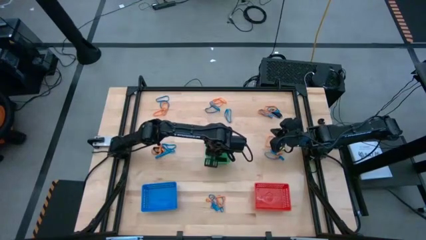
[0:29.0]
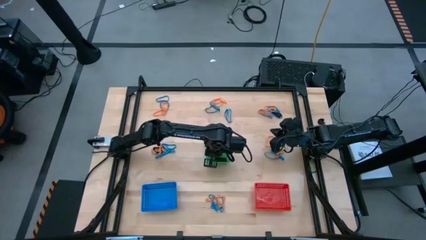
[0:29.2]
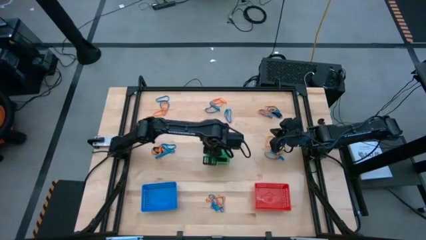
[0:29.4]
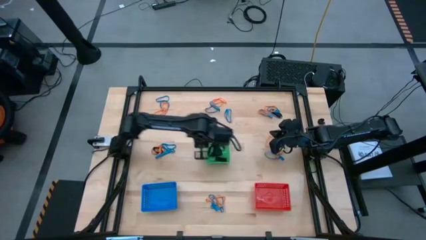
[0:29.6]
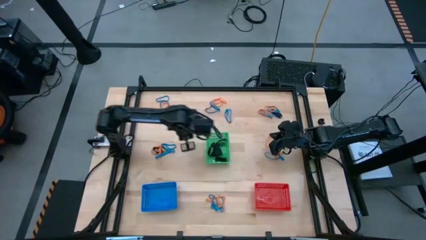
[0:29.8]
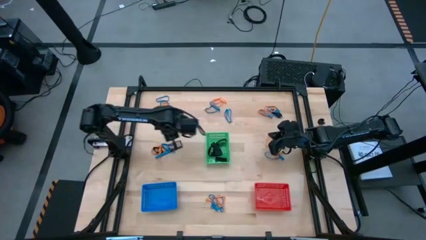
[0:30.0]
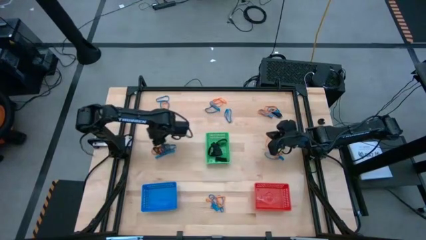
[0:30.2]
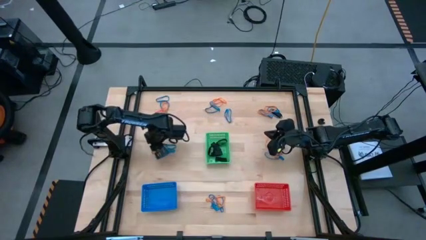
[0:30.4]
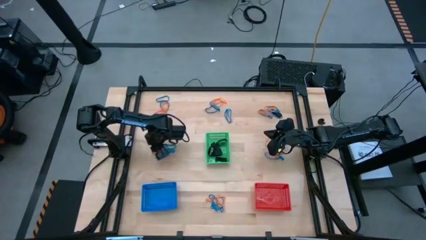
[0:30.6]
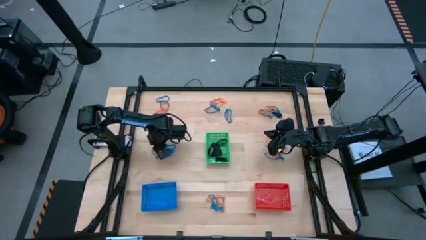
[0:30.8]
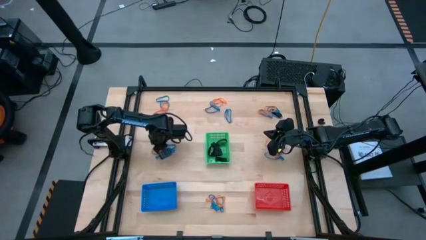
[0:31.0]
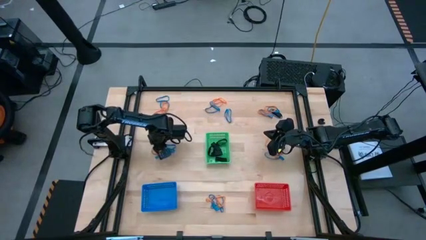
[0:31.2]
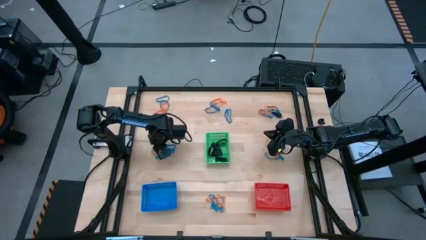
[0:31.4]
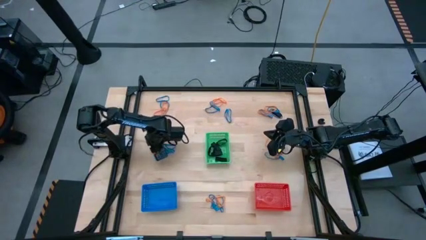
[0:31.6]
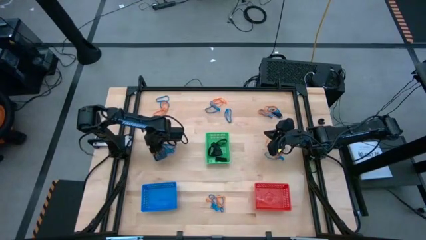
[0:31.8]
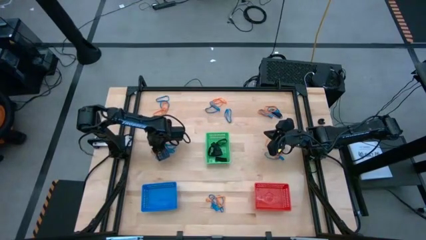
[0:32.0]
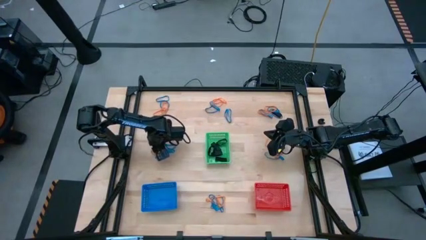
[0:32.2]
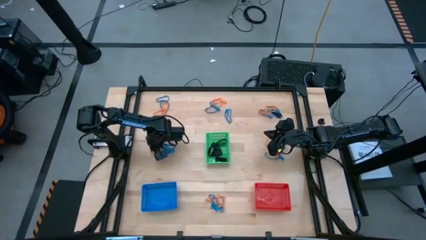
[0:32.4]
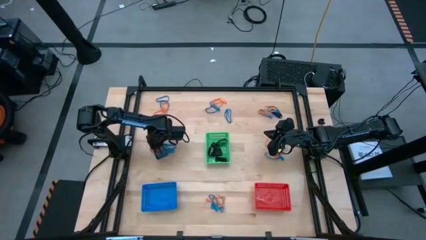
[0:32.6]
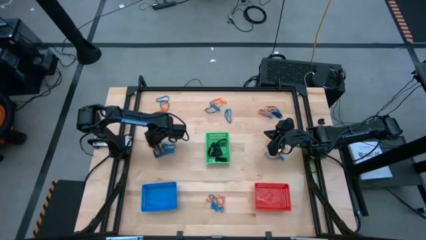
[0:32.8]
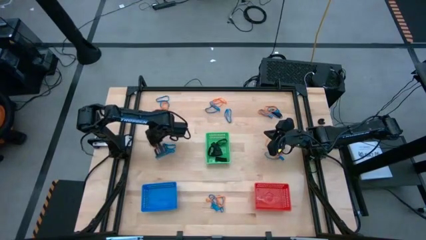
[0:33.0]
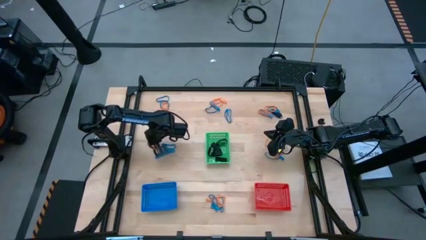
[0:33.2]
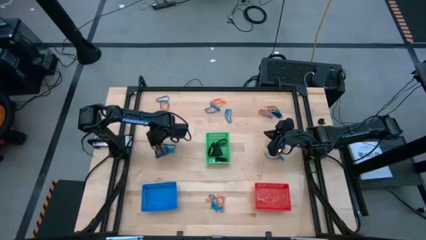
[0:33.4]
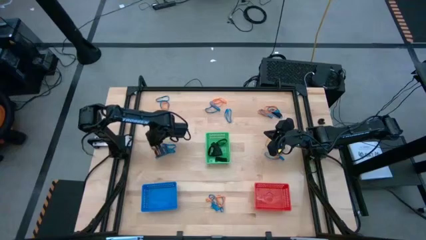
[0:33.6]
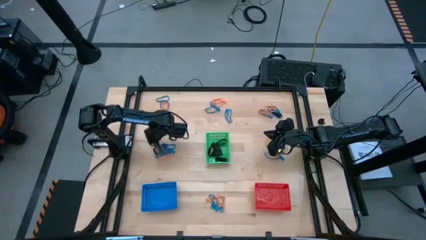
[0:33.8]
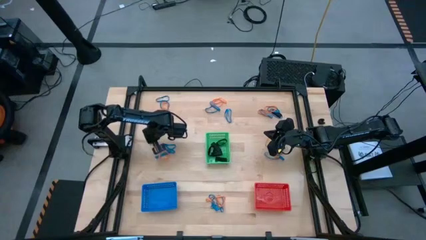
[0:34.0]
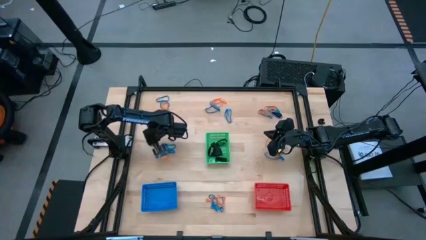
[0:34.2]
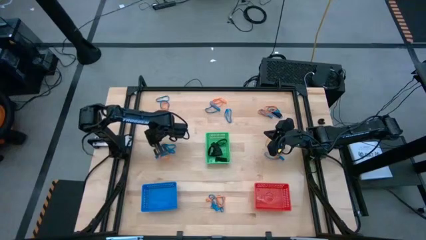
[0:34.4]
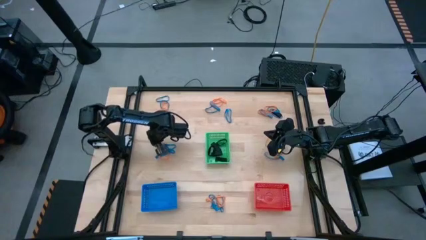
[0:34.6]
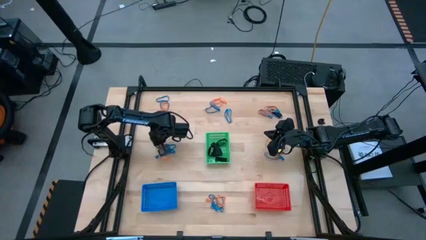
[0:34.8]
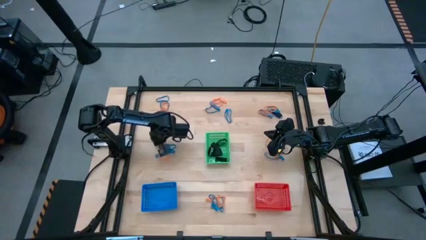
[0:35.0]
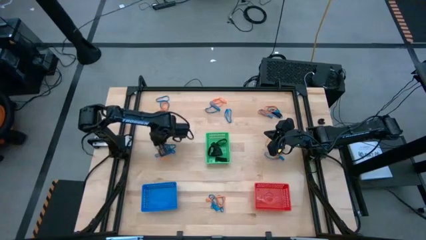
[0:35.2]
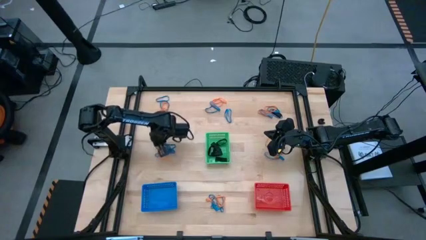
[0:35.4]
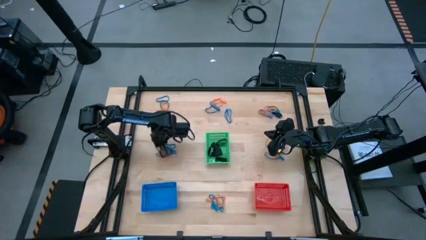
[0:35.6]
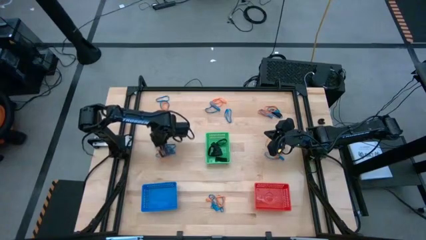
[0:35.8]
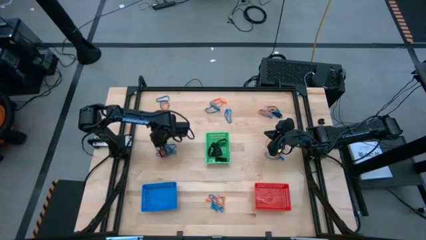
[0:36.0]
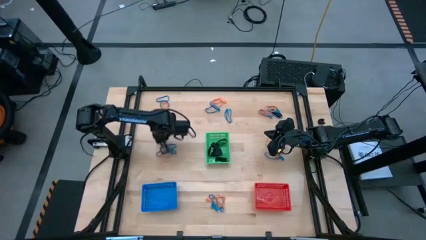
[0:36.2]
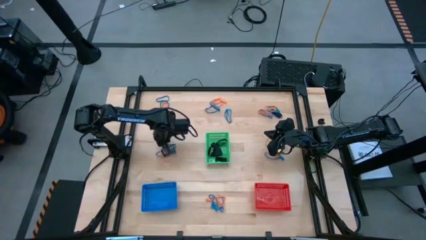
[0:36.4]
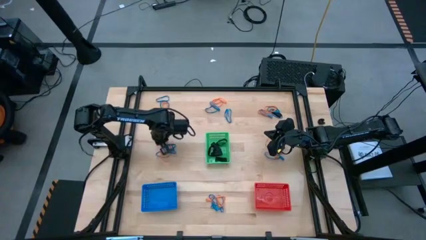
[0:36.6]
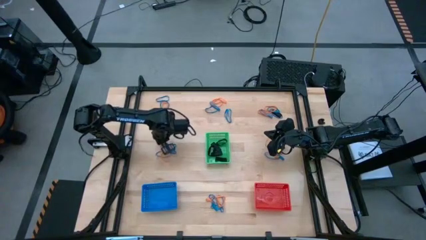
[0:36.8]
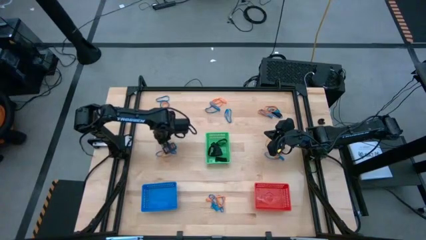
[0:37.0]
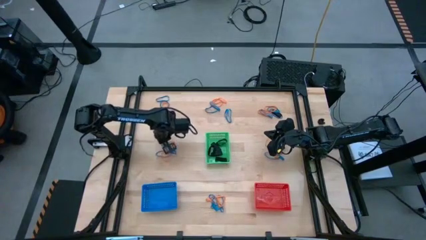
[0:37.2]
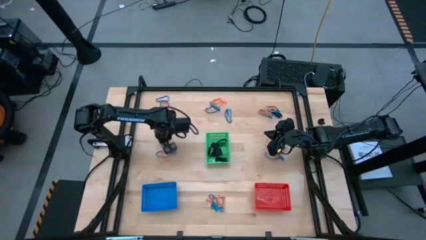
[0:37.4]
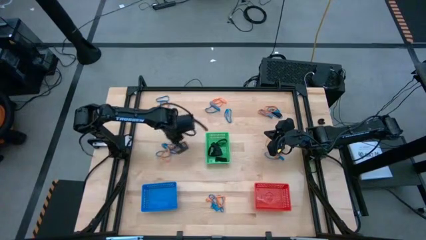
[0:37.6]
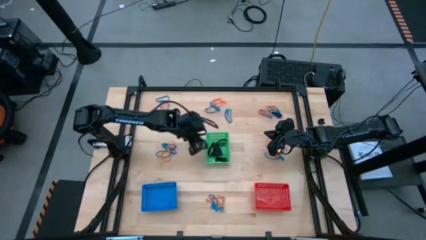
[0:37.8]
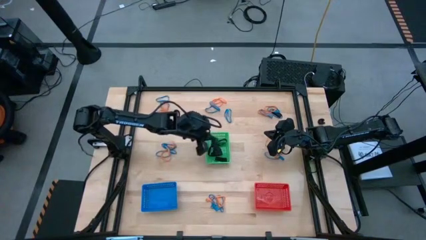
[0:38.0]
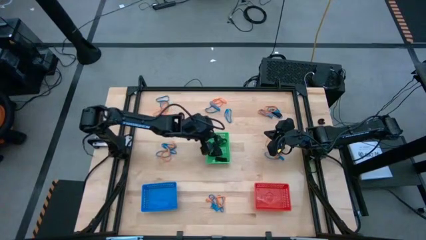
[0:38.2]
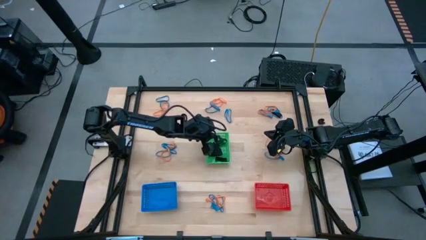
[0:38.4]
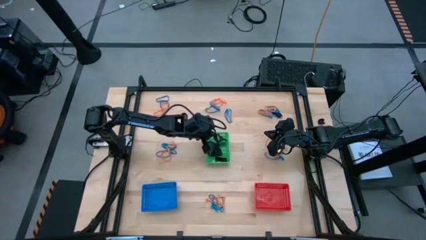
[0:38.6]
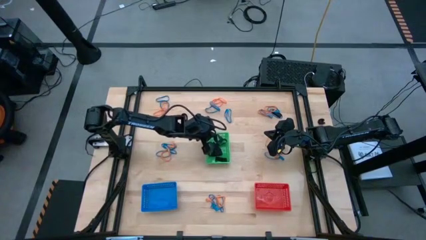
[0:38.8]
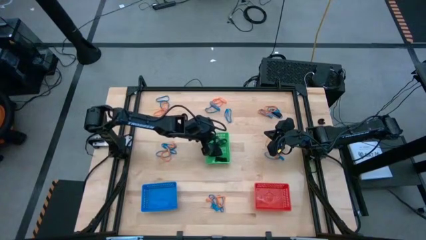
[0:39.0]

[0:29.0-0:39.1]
Task: Sort rubber bands into baskets
Put the black rubber band into the green bin

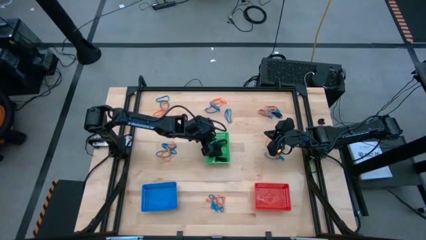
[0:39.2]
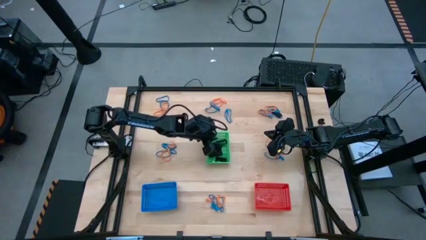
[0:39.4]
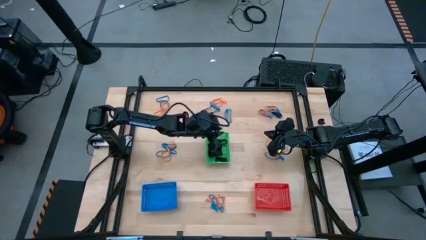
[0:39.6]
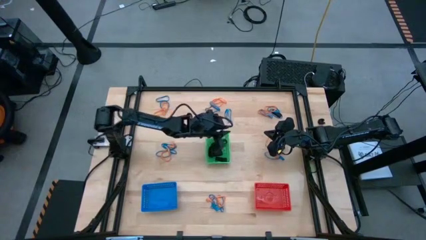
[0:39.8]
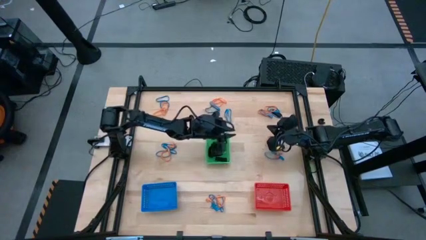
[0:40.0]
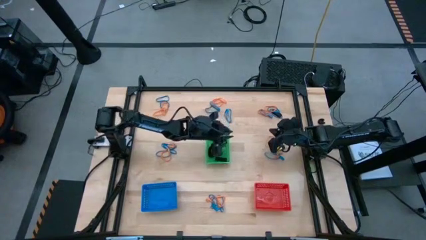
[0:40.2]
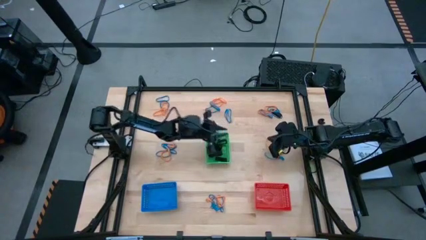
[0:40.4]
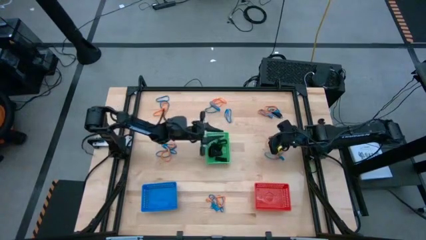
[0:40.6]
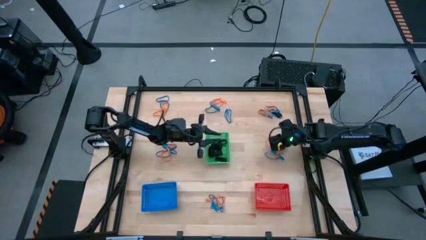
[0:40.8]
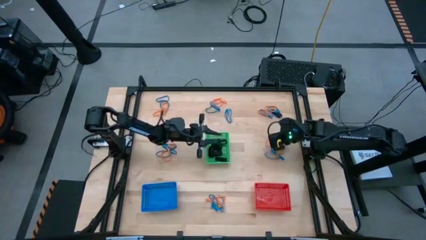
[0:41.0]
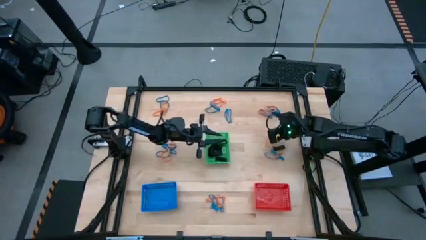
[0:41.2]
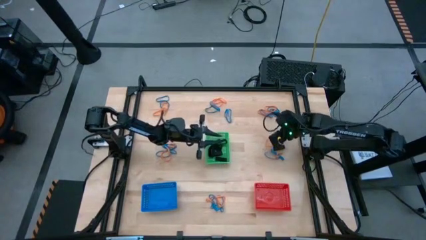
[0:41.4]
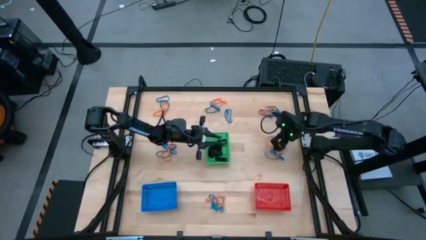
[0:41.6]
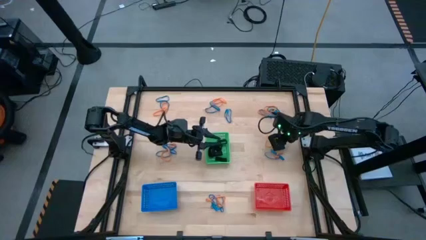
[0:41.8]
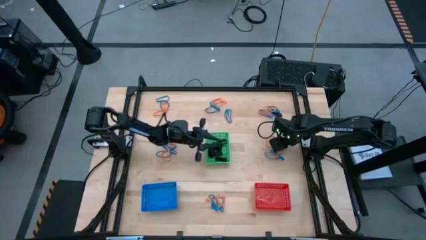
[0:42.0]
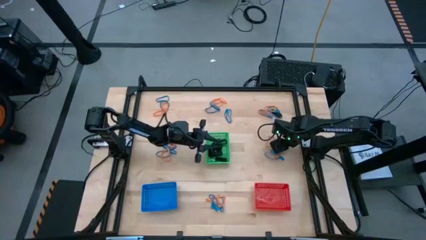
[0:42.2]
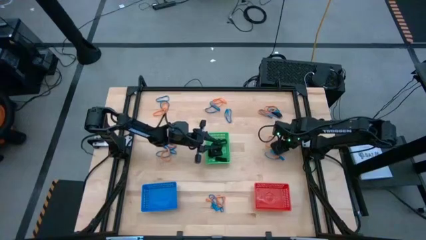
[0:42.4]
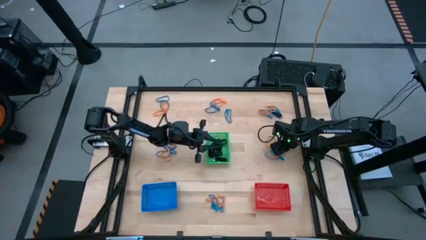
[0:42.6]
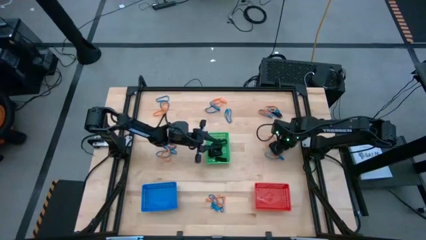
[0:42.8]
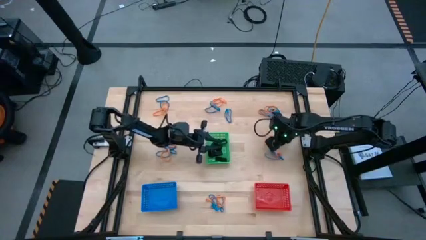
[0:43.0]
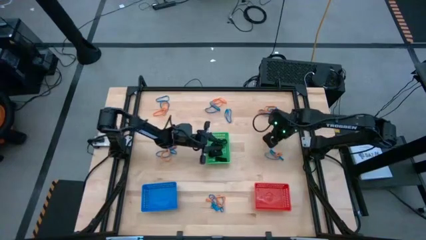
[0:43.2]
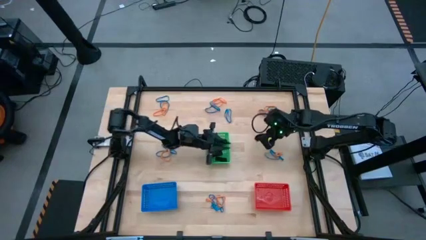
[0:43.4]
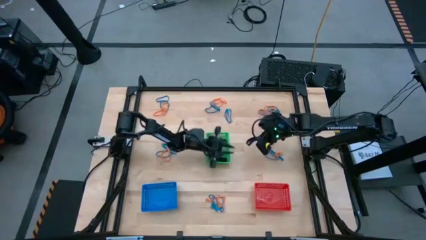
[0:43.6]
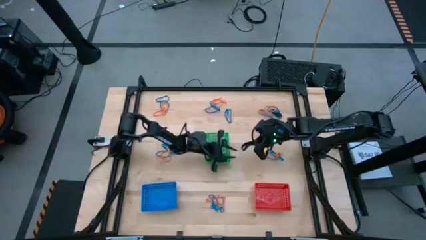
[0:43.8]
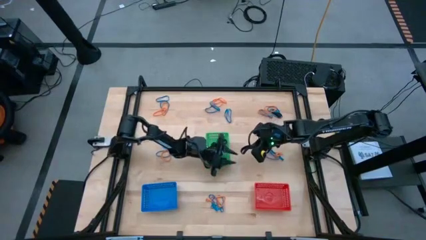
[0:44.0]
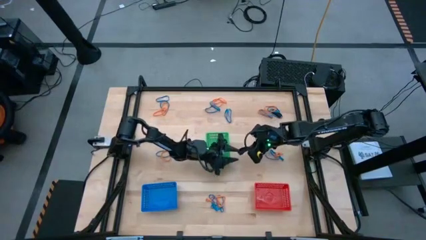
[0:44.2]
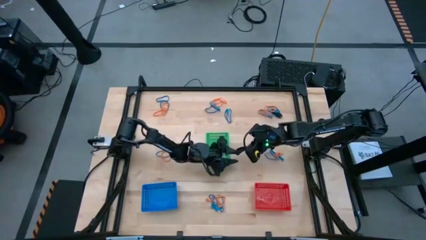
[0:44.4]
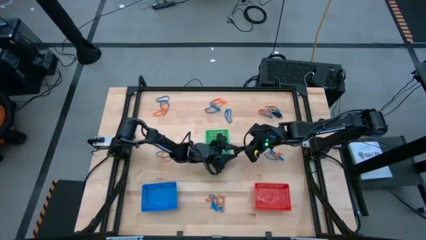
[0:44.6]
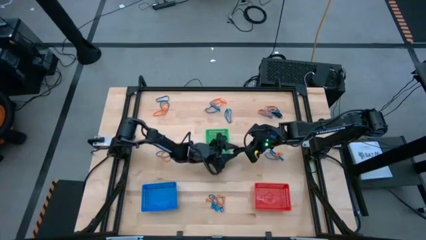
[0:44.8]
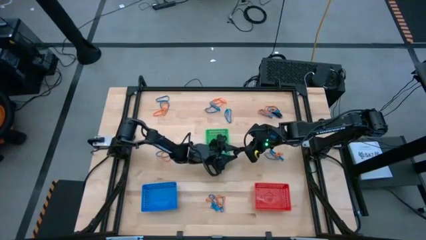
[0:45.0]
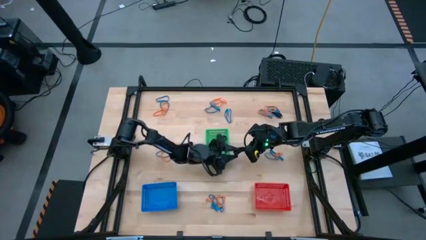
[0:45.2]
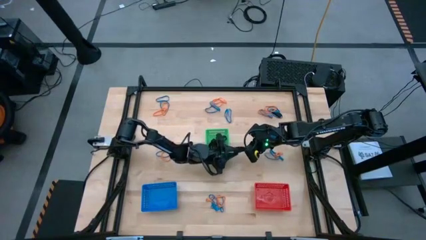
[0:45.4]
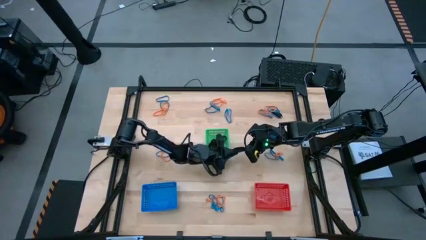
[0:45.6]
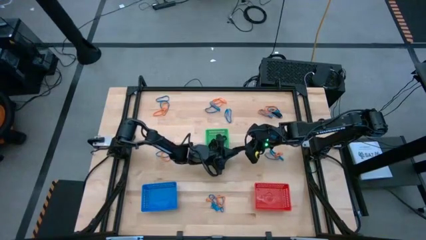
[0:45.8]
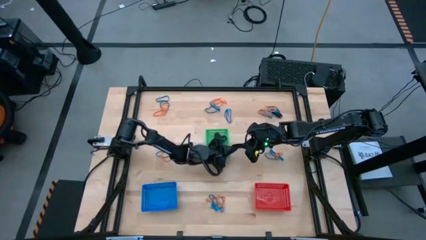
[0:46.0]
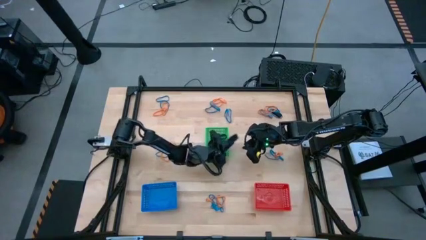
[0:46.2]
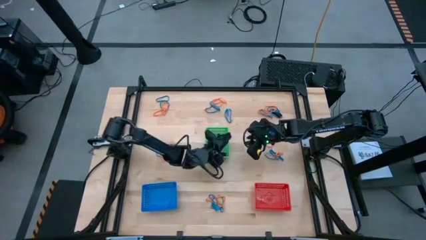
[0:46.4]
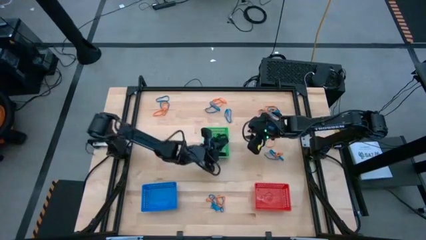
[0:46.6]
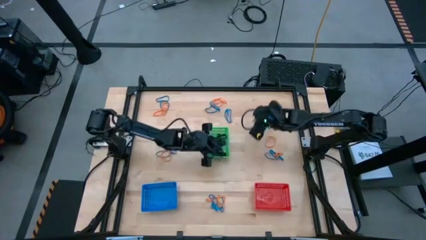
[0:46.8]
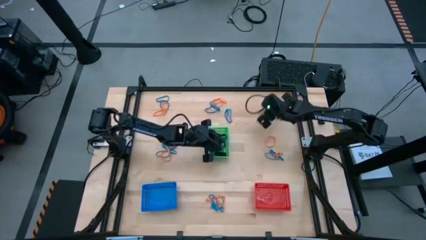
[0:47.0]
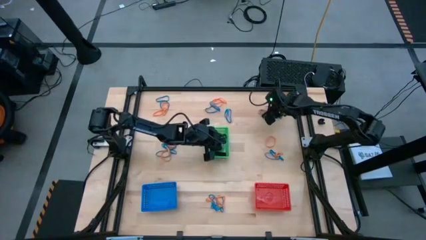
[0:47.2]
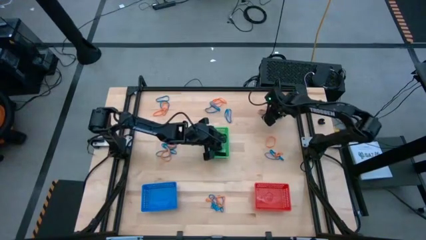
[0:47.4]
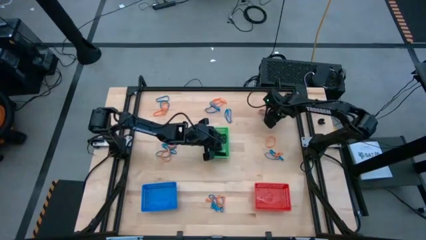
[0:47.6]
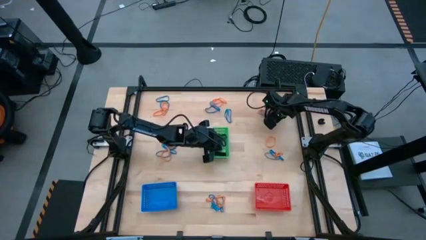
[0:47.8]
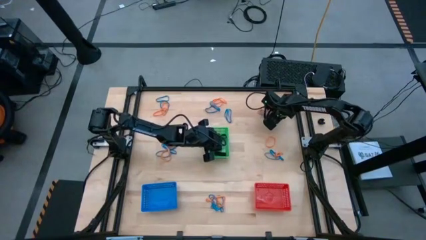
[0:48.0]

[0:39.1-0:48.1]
Put the black rubber band into the green bin
